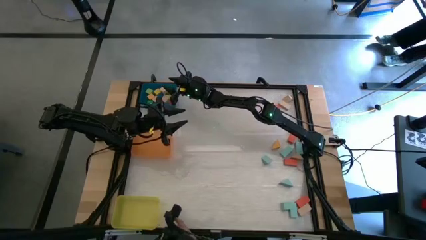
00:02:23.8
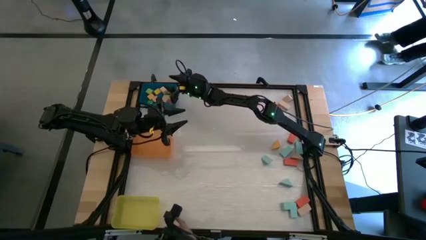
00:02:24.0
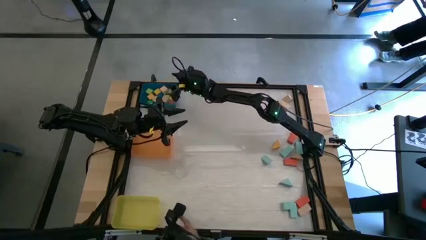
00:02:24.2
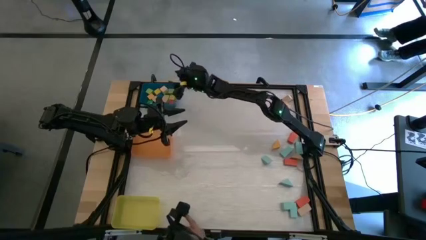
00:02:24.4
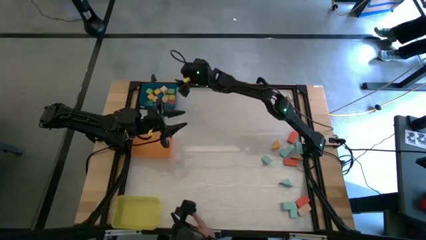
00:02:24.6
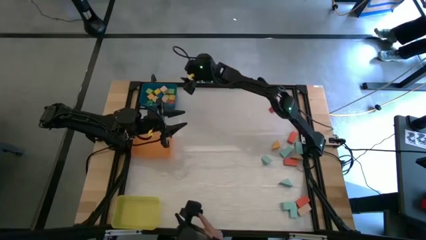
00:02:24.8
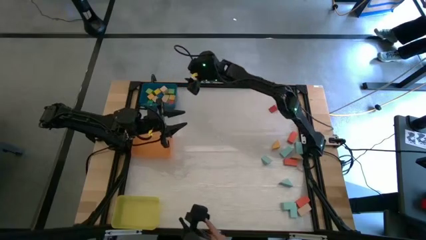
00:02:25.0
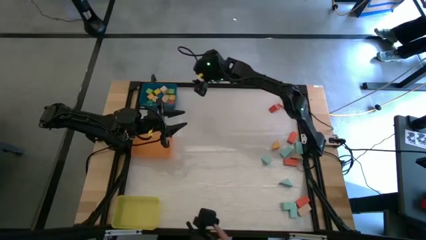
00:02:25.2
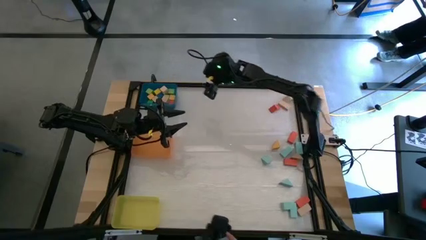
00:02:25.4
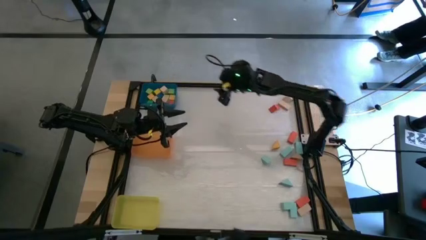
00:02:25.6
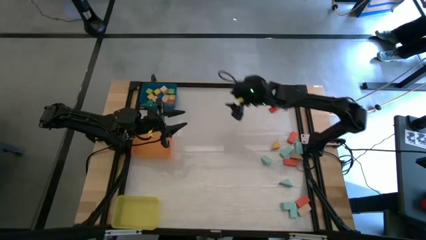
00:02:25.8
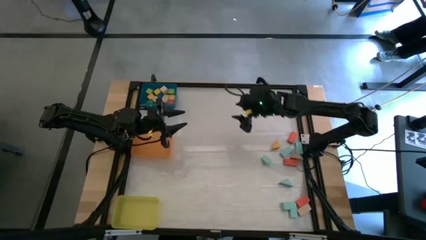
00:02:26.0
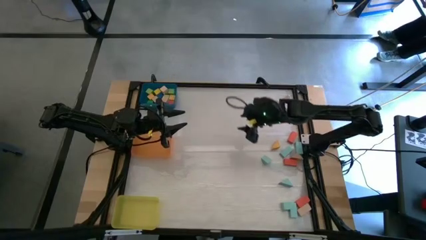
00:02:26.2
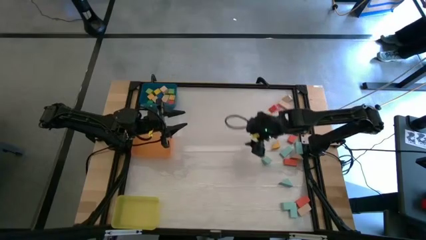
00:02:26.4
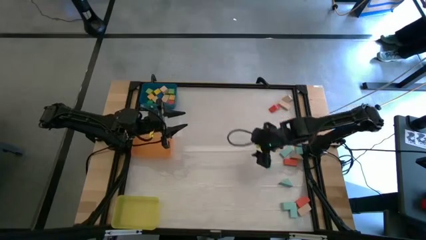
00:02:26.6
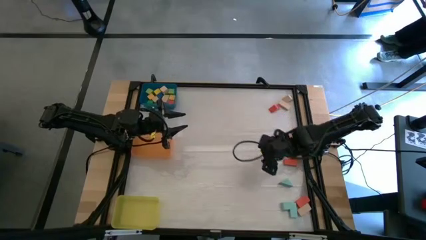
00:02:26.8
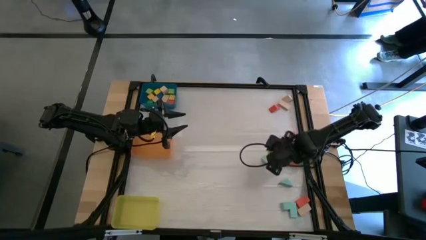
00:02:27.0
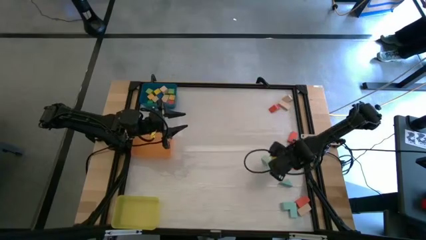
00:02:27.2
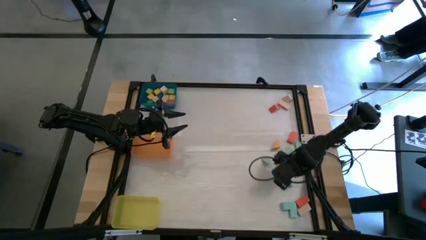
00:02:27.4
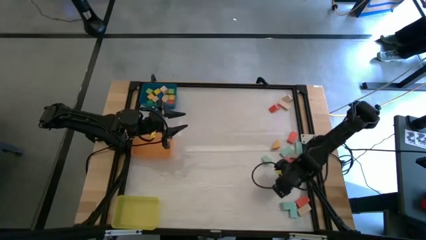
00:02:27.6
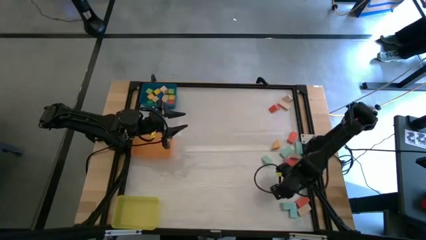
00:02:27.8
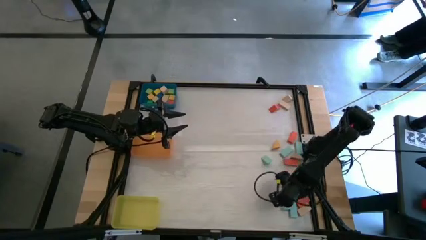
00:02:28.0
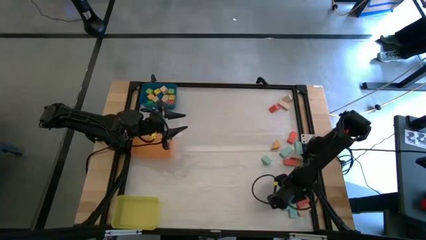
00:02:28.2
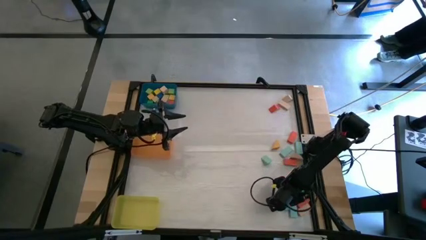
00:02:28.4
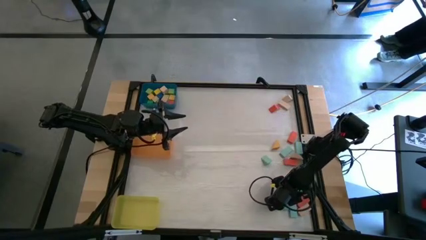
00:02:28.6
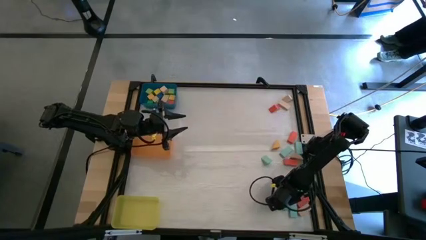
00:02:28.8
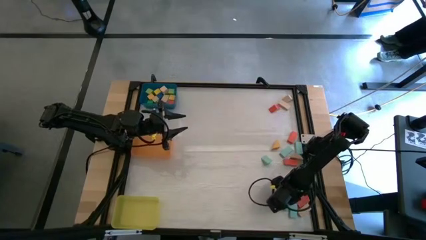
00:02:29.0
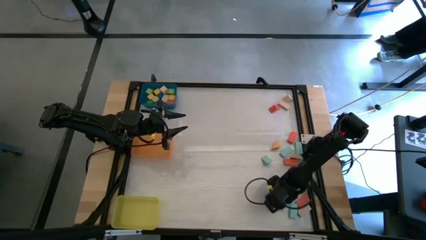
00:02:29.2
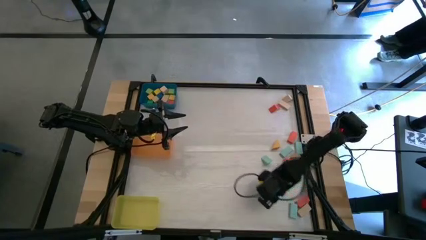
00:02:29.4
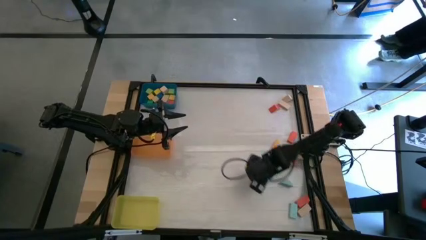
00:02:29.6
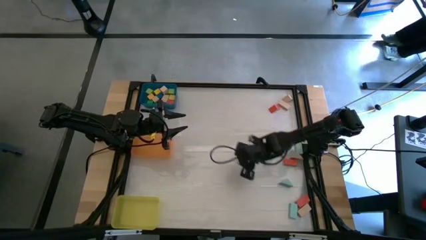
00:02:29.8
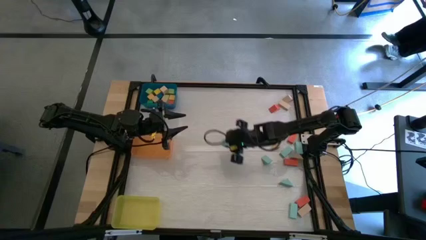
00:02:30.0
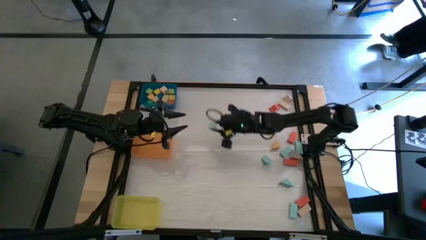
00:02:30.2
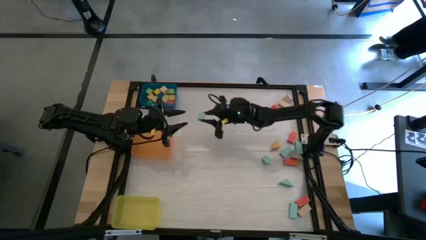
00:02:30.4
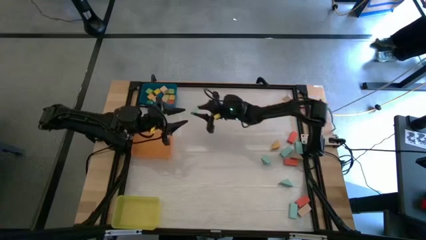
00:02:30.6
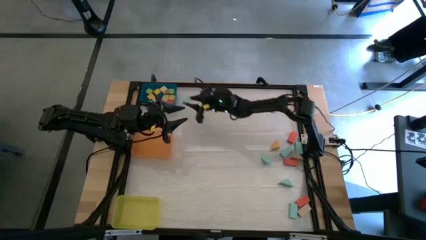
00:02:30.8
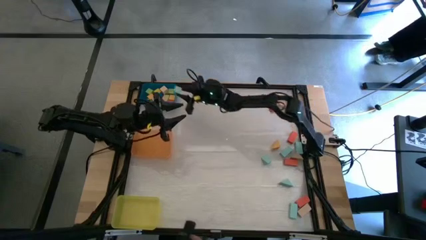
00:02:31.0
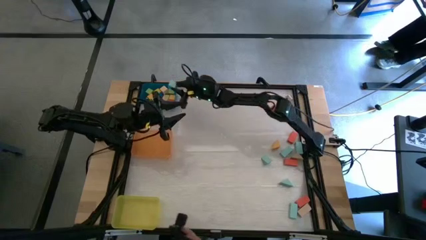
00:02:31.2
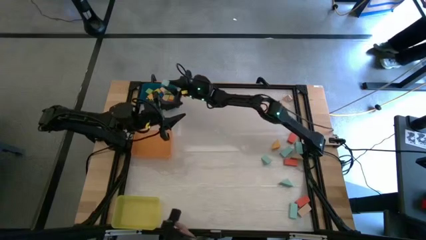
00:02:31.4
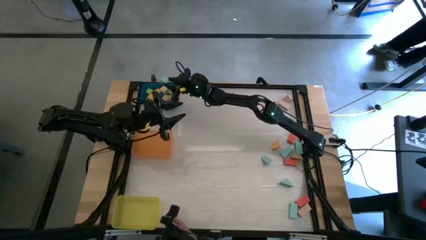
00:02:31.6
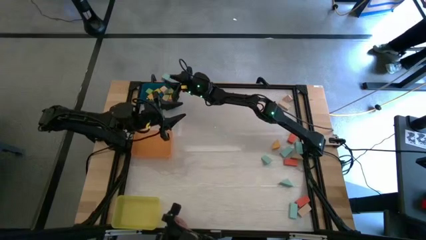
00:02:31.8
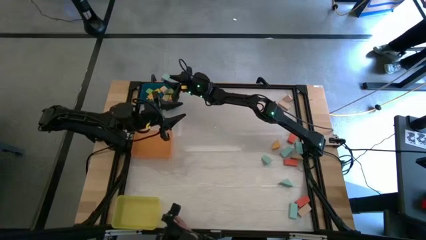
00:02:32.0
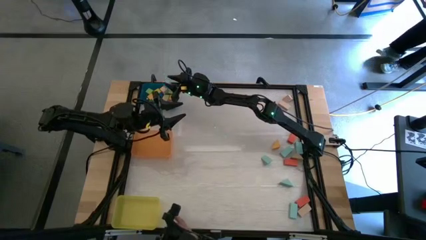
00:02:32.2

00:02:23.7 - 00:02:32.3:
Task: Sort blocks by size
Put the light blue cube block into the blue bin

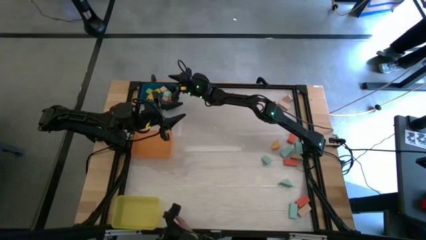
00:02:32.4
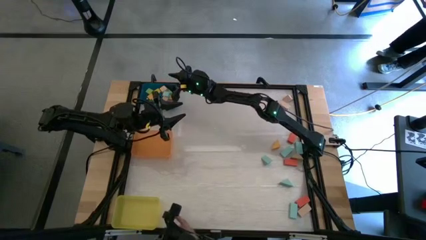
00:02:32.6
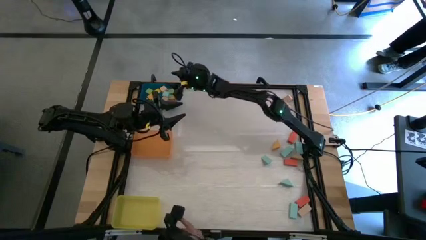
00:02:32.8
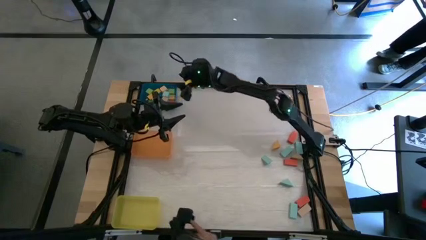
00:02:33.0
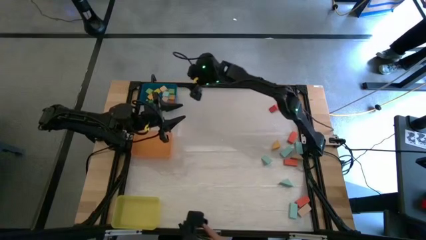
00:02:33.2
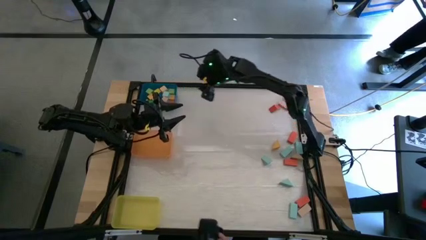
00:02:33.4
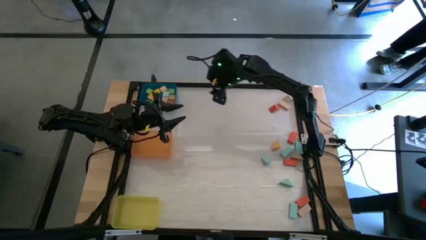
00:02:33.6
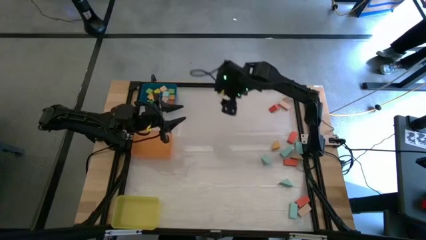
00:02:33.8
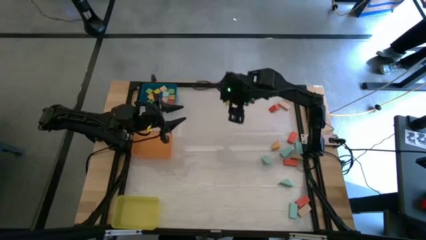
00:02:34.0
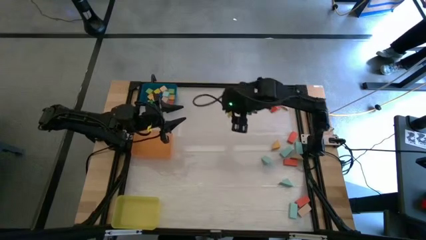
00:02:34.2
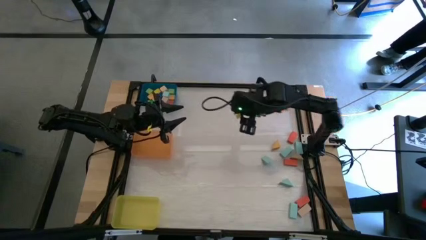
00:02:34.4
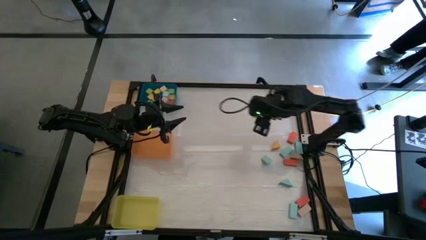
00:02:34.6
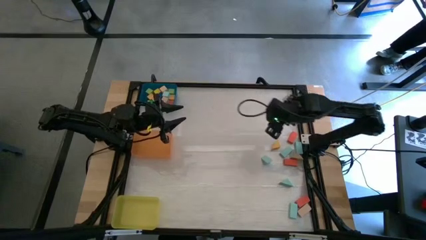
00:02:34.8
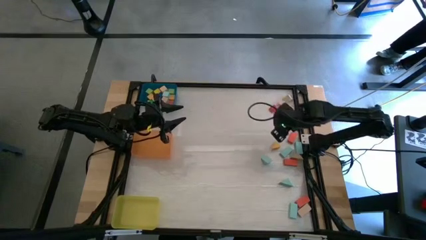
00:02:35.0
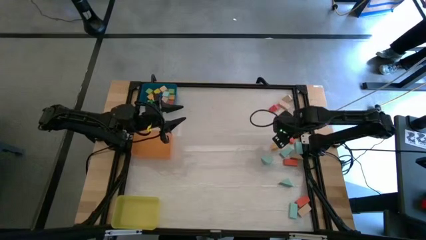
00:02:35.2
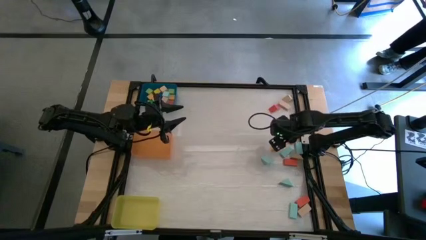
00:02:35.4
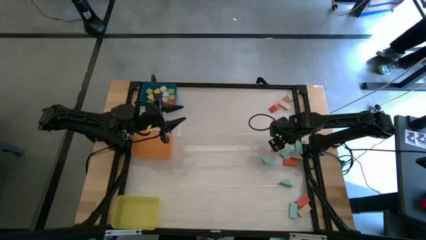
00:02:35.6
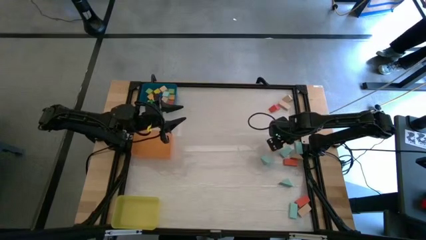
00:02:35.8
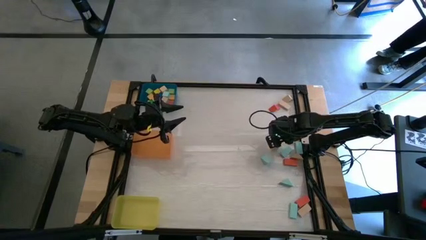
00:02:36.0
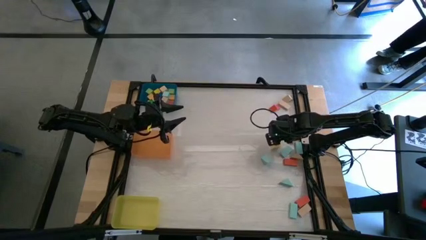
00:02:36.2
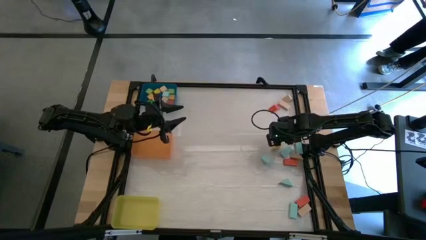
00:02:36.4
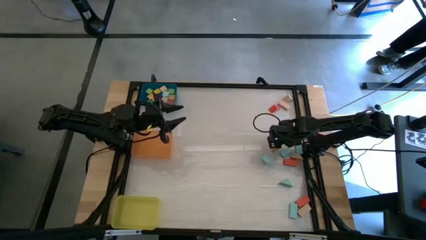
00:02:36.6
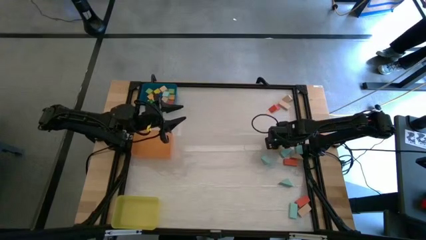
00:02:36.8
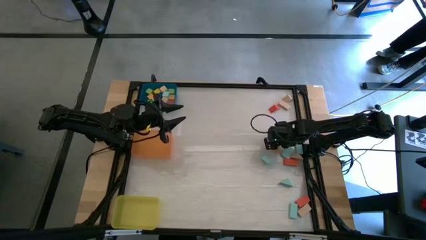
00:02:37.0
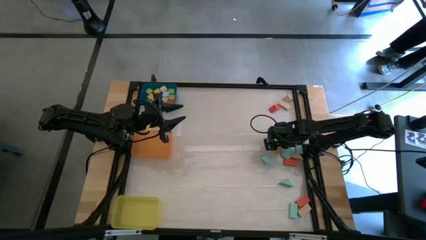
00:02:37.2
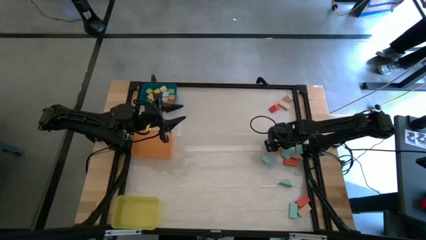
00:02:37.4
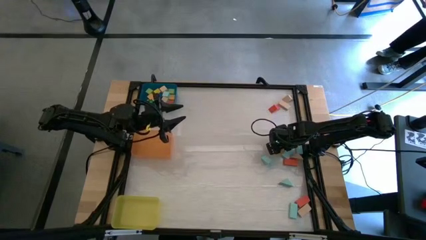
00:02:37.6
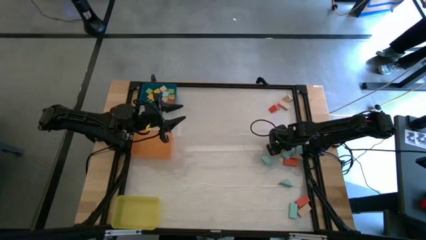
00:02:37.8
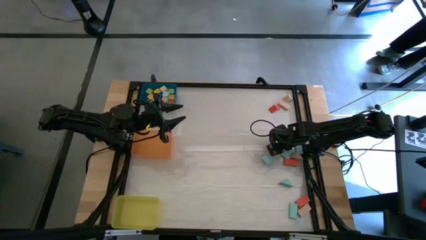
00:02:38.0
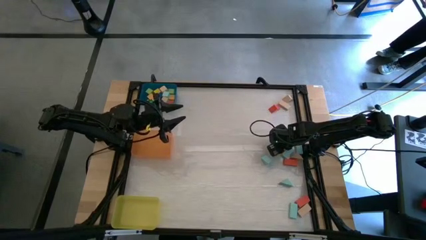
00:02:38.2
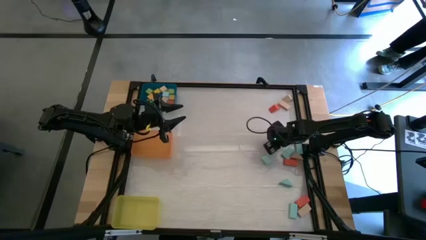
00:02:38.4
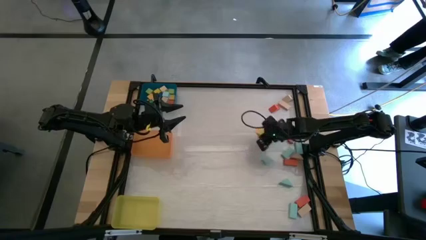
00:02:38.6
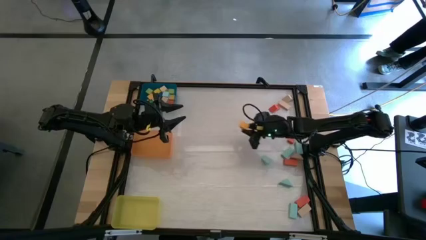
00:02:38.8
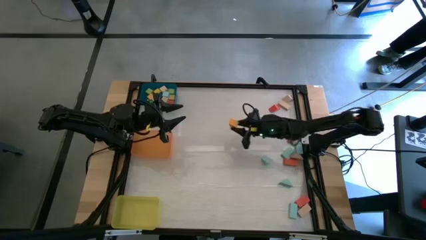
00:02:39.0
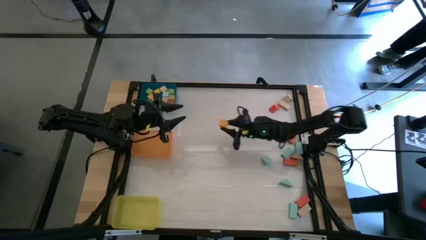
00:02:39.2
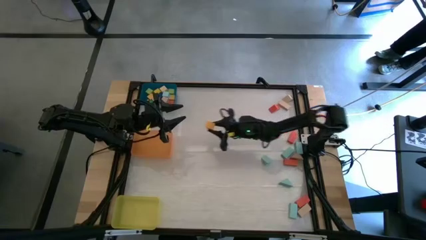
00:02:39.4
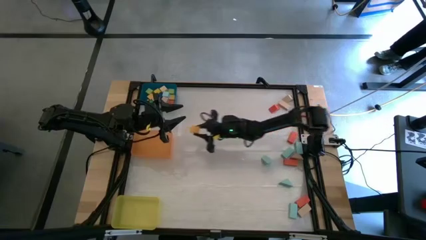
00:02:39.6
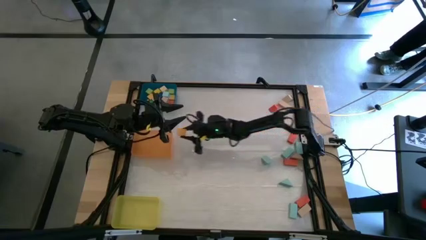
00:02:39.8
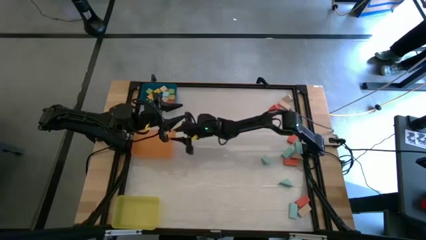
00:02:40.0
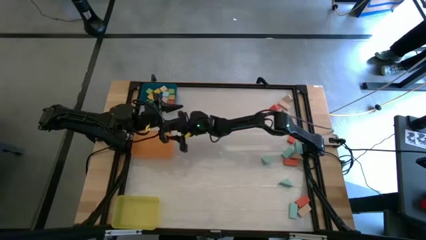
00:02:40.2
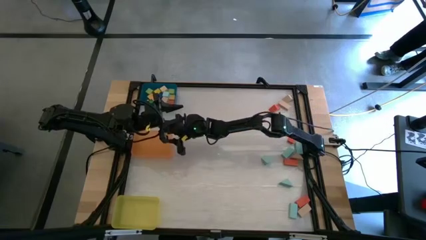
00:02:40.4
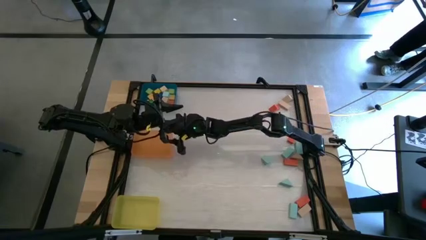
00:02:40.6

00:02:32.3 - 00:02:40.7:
Put the yellow triangular block into the orange bin
